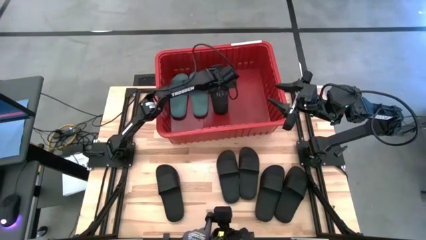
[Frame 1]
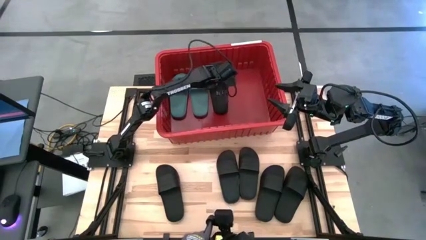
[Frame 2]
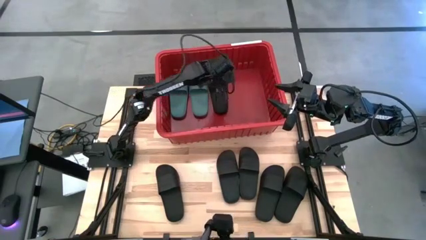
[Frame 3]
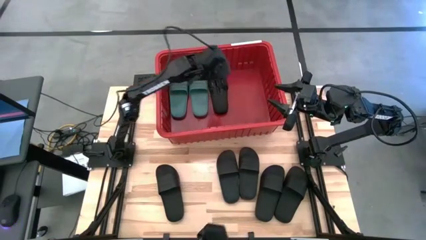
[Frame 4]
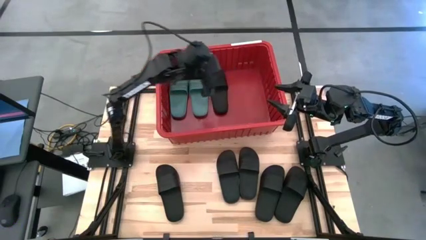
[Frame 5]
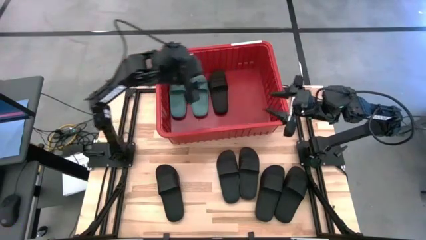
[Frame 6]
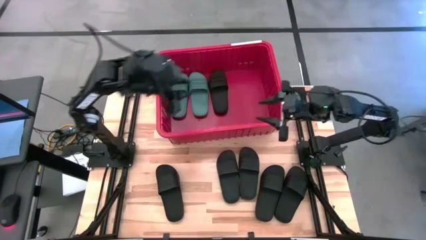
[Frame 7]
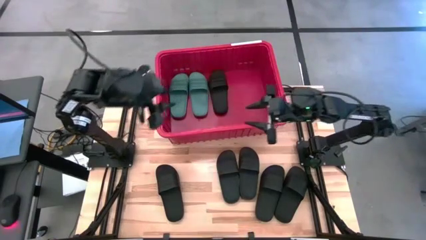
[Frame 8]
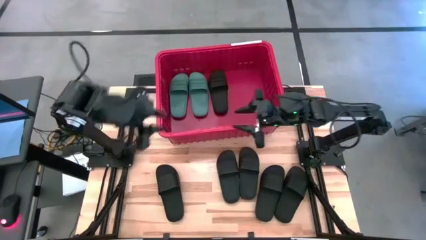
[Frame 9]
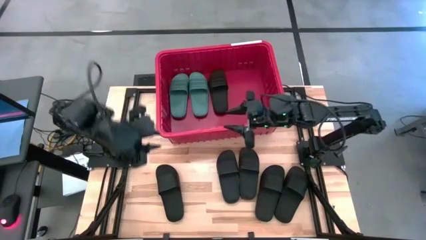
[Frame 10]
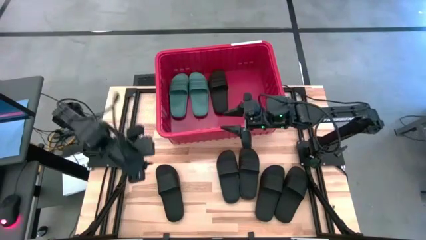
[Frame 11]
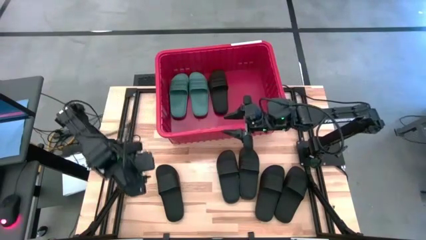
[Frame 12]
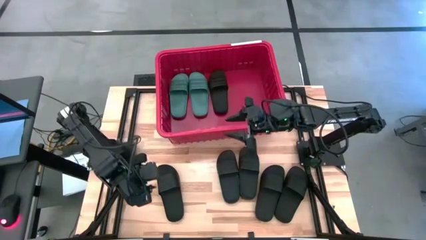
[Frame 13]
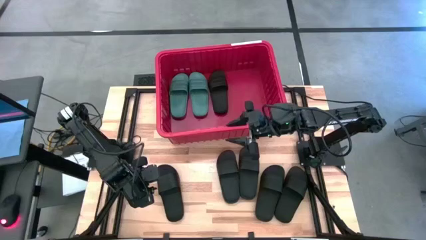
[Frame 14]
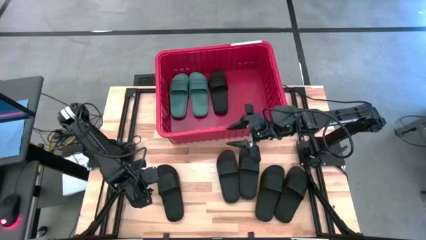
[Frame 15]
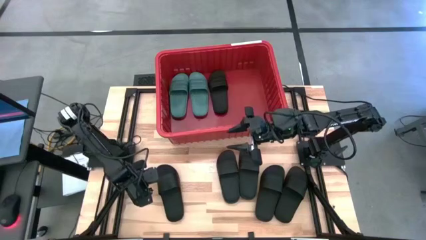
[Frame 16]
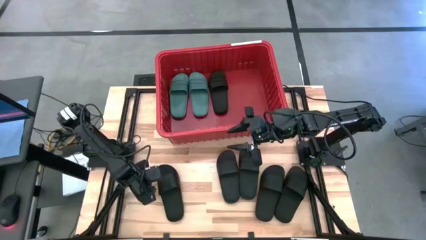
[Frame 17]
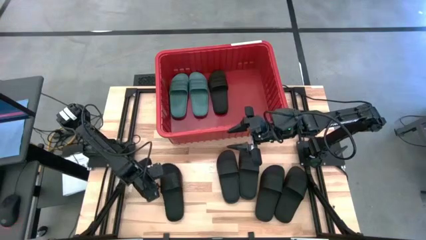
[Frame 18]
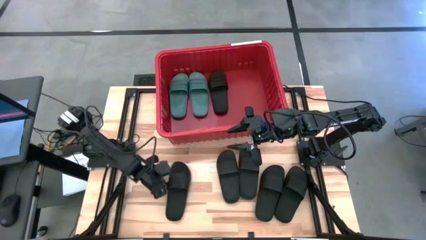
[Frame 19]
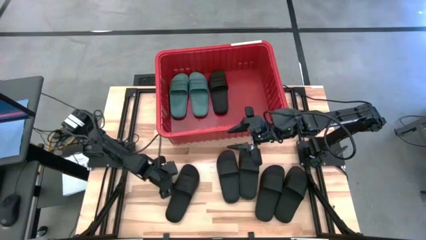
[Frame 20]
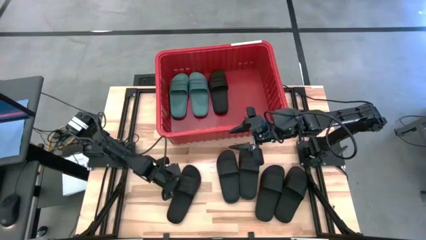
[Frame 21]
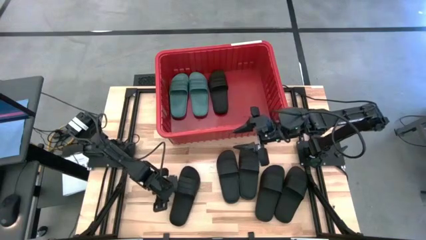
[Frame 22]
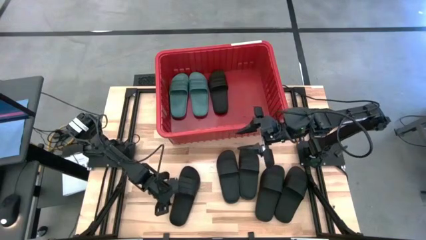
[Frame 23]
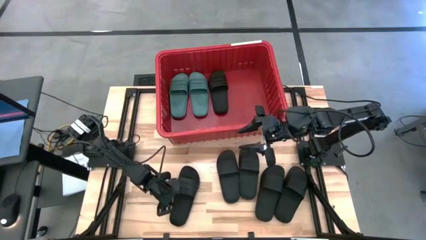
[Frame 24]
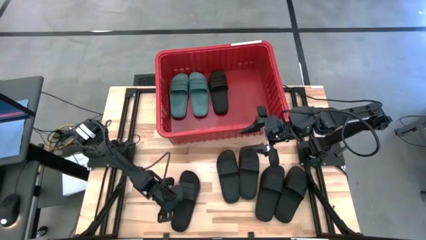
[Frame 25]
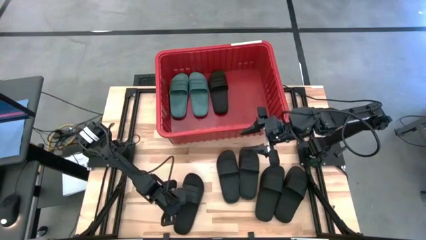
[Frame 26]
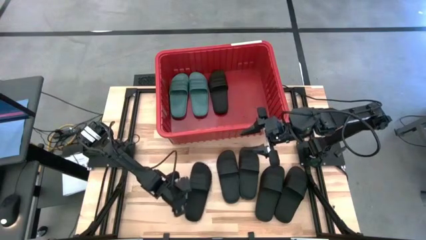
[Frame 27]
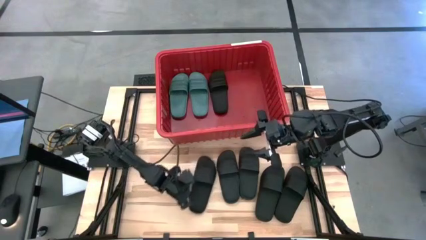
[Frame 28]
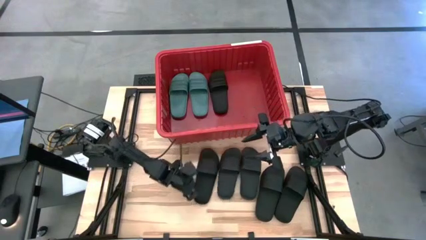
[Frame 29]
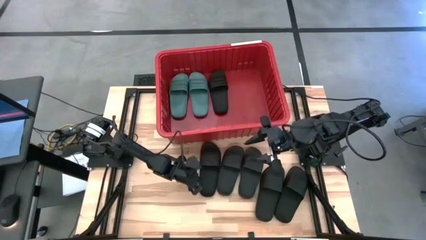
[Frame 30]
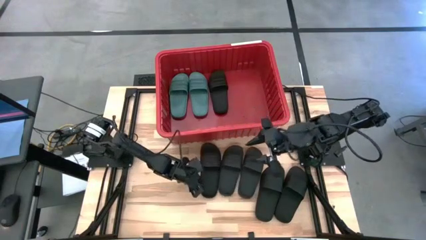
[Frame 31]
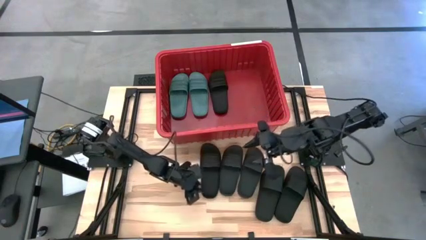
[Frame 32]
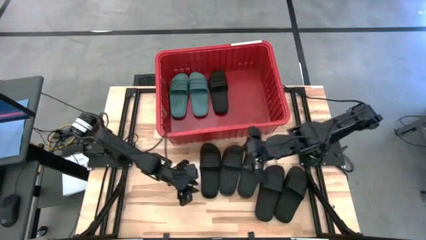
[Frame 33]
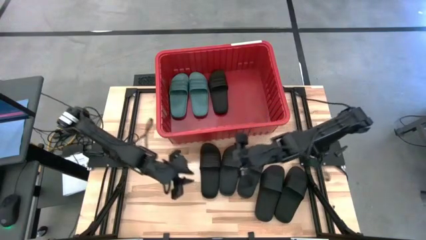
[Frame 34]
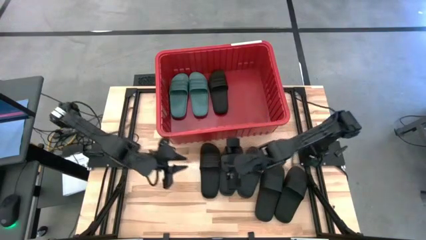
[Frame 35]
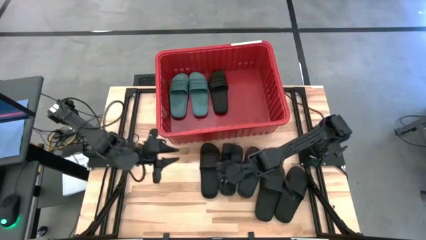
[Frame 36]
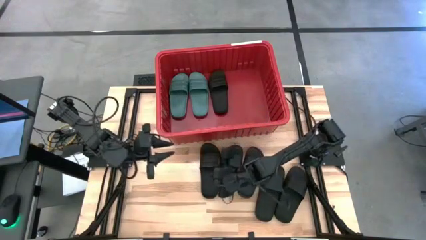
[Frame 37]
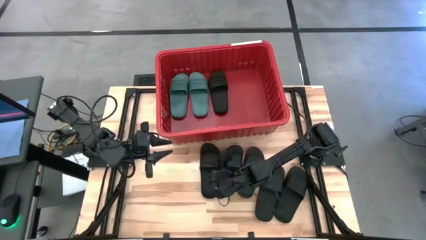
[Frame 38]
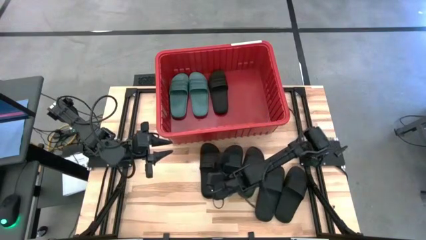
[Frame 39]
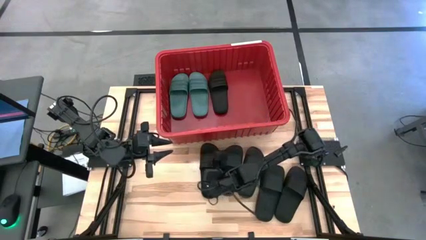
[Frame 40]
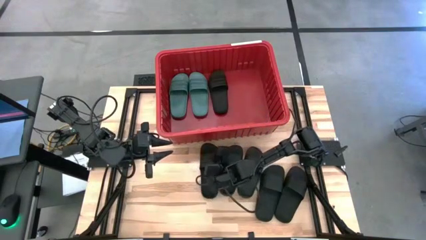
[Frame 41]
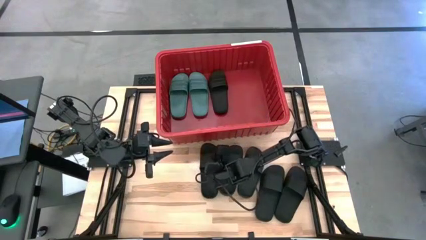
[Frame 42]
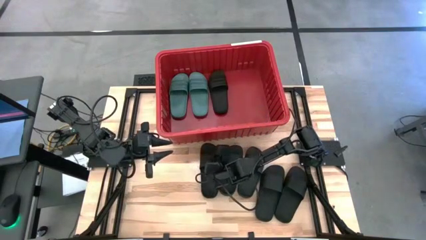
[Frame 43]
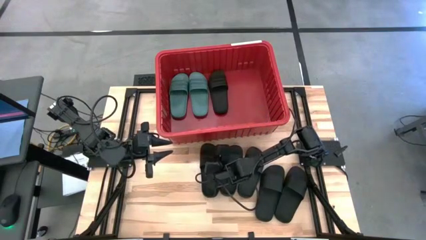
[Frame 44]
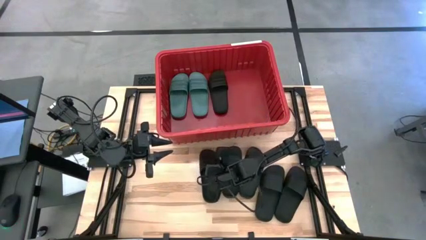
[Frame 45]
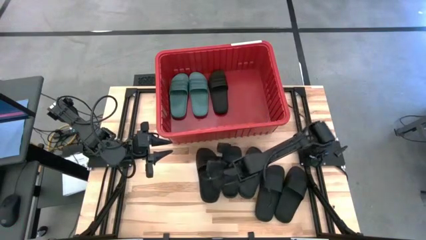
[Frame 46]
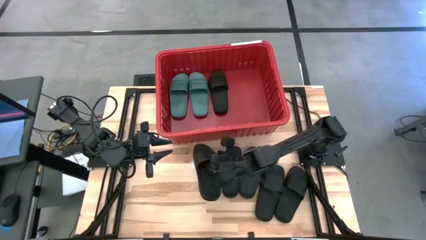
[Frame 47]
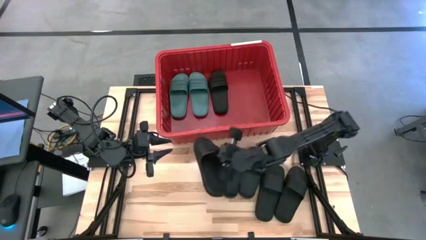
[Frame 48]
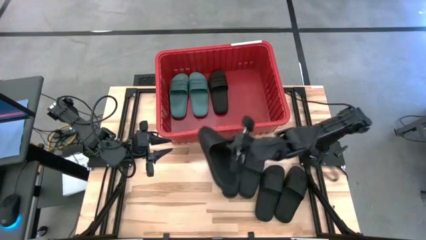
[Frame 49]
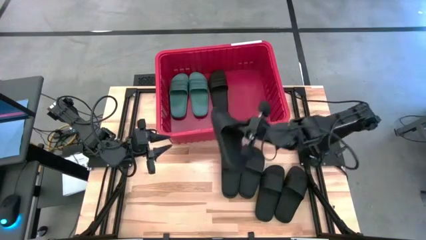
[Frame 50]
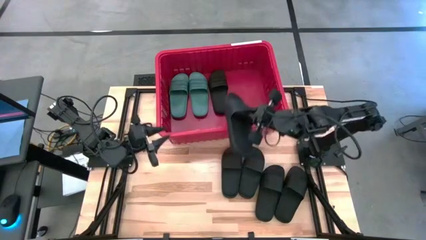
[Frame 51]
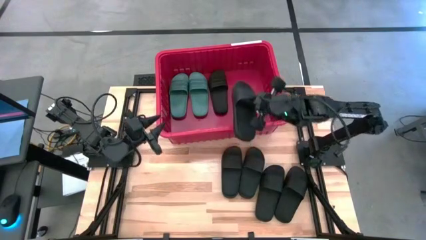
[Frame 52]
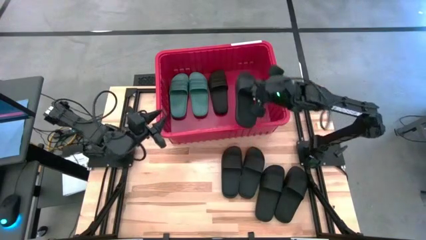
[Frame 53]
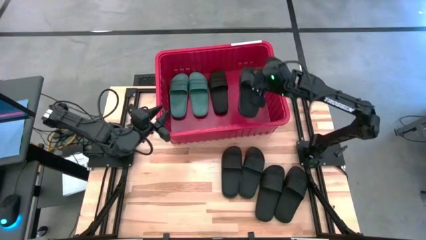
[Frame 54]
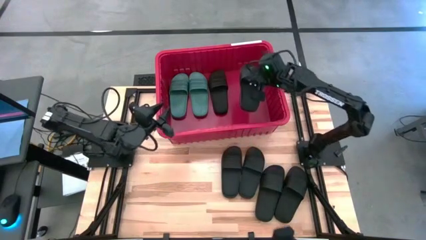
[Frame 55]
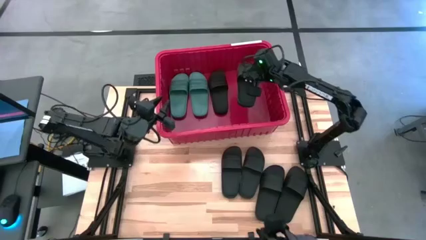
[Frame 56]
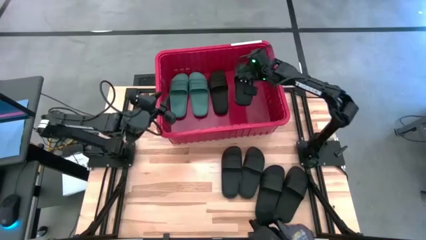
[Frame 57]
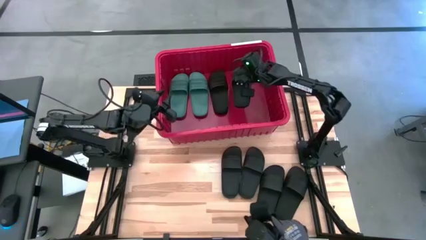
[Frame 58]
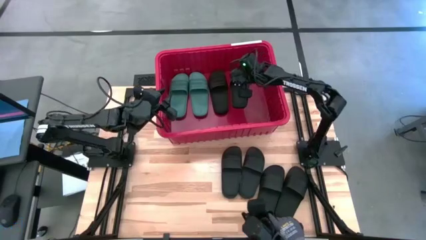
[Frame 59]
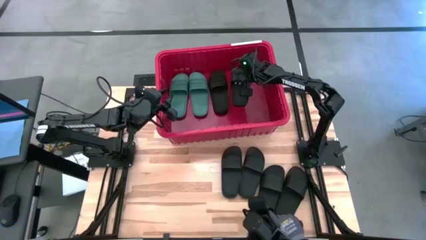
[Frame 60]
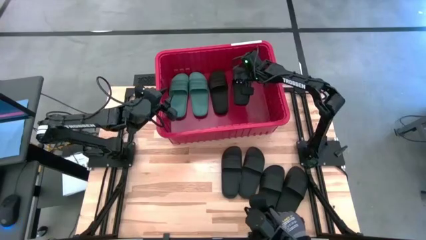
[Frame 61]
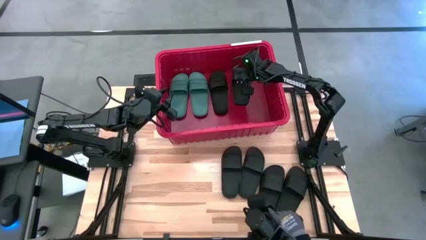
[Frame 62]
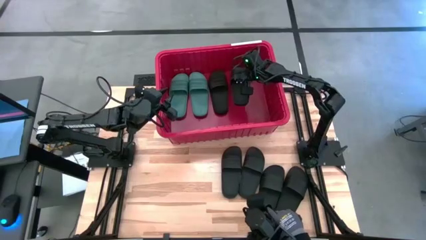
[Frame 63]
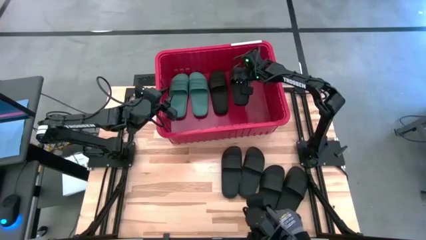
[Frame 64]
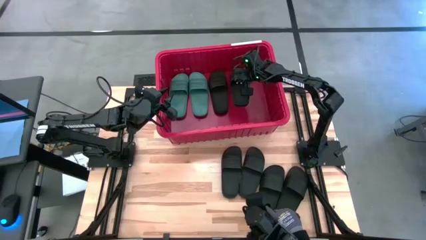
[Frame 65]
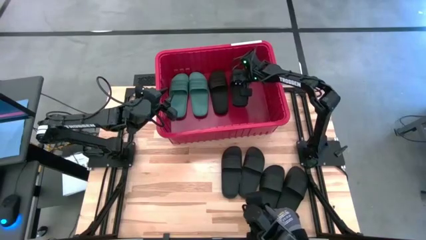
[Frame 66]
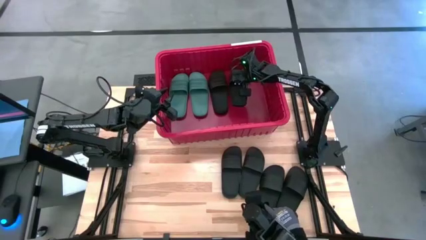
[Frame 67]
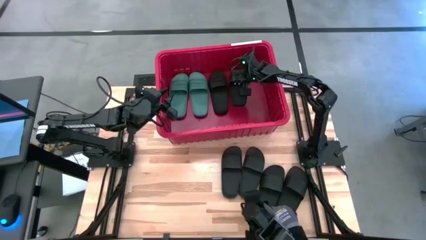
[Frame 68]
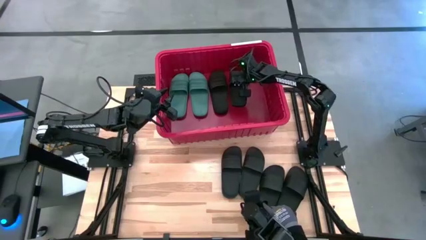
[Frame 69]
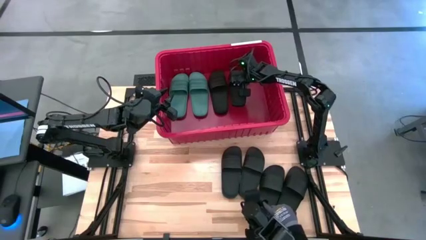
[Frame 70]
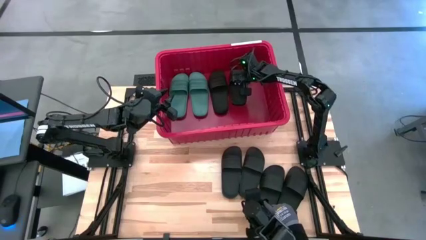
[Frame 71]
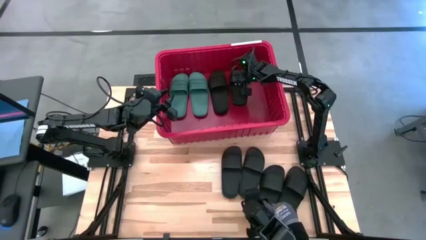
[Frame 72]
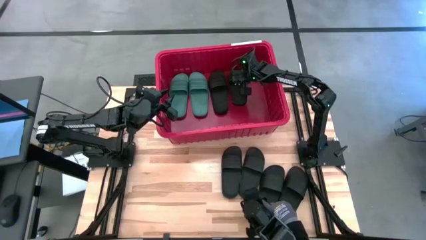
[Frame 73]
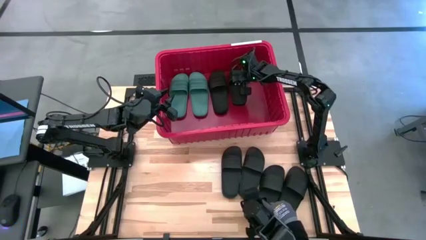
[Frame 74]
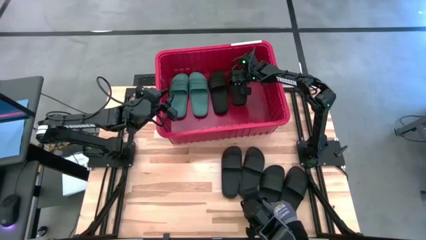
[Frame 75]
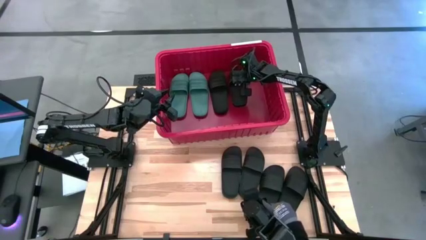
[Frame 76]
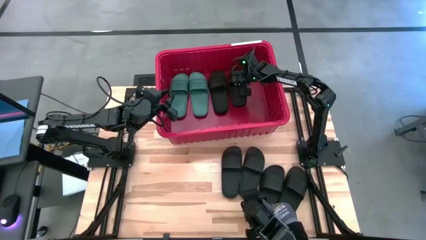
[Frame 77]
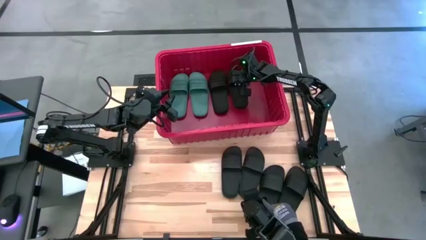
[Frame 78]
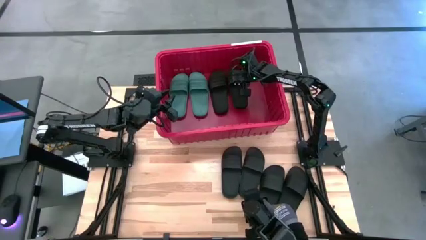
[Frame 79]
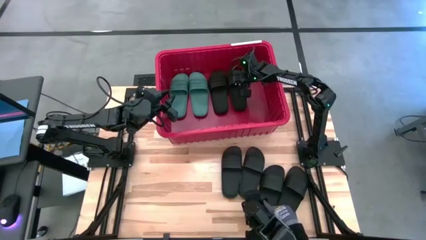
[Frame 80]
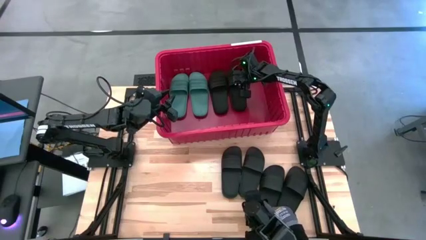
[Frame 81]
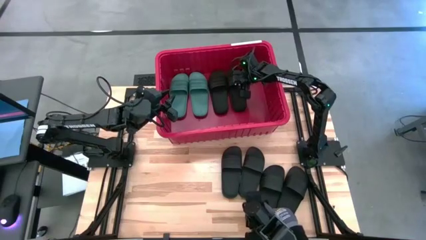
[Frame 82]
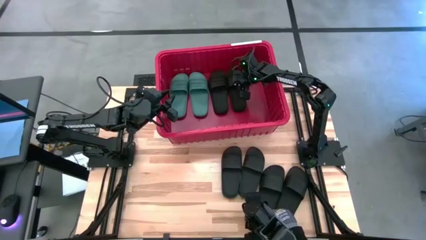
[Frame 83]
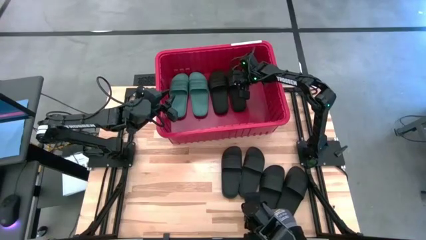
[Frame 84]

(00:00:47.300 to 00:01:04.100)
Task: Pick and place slides into bin
Put the black slipper into the red container
